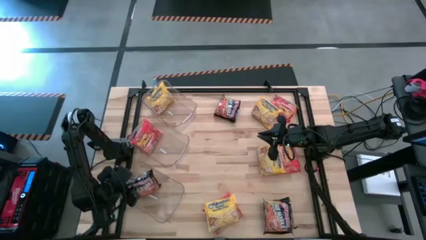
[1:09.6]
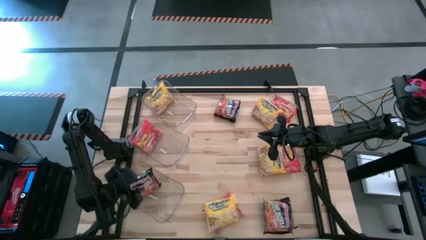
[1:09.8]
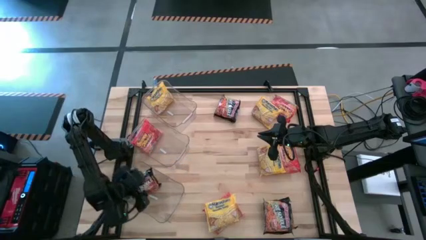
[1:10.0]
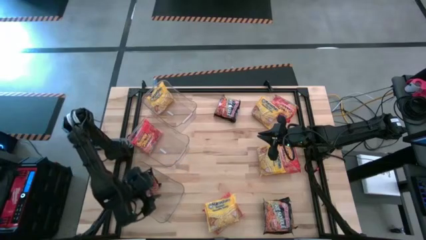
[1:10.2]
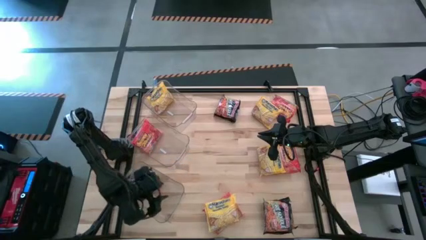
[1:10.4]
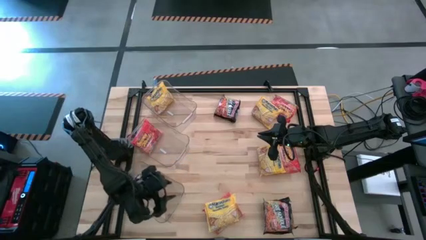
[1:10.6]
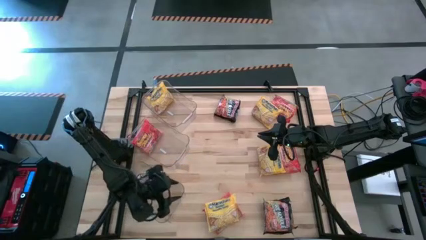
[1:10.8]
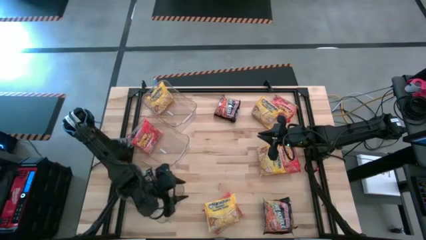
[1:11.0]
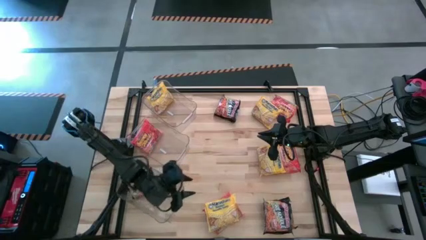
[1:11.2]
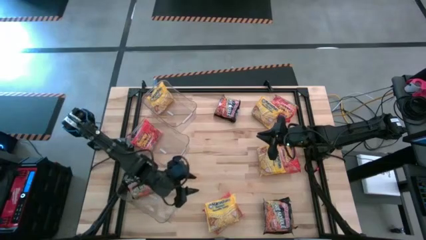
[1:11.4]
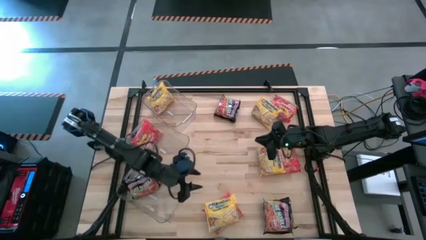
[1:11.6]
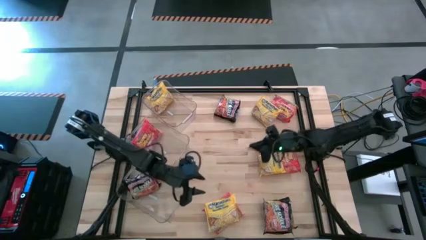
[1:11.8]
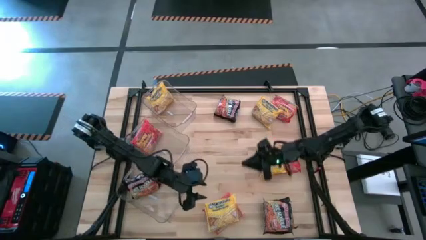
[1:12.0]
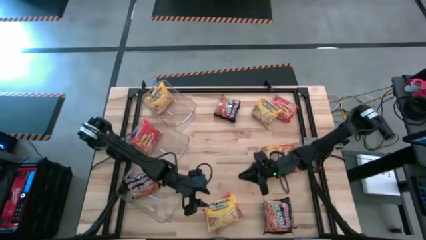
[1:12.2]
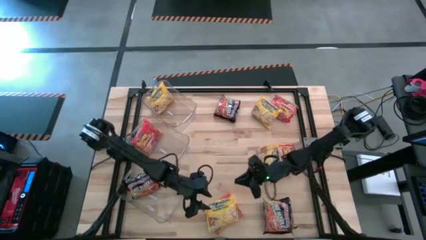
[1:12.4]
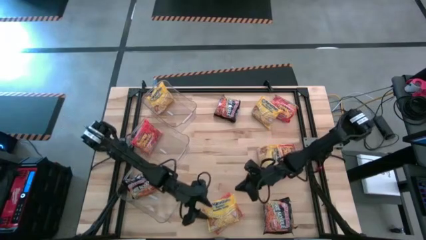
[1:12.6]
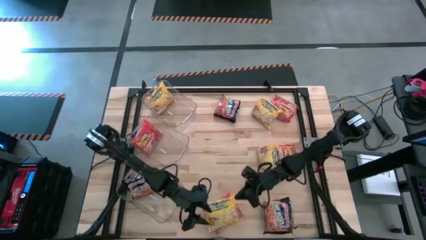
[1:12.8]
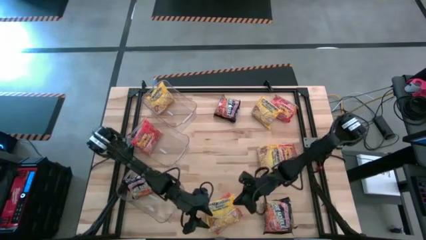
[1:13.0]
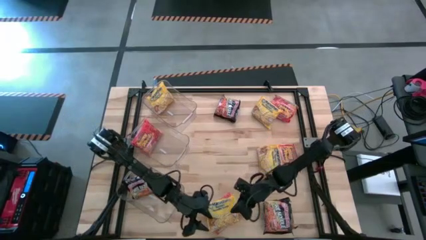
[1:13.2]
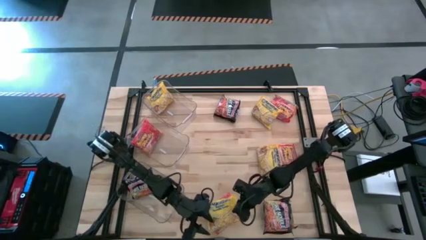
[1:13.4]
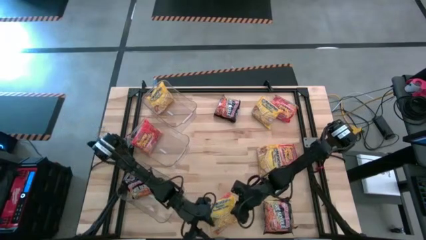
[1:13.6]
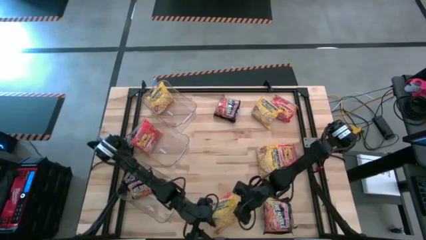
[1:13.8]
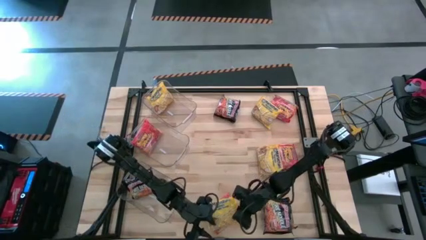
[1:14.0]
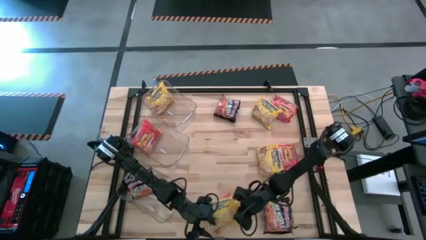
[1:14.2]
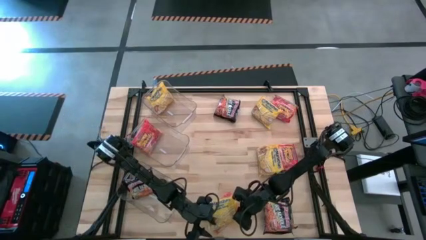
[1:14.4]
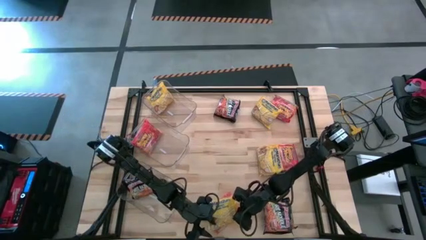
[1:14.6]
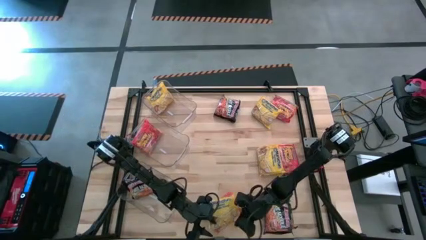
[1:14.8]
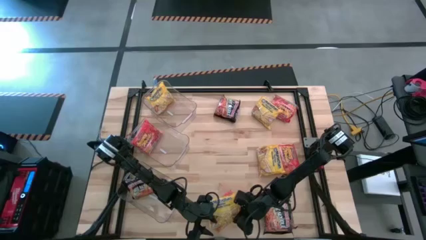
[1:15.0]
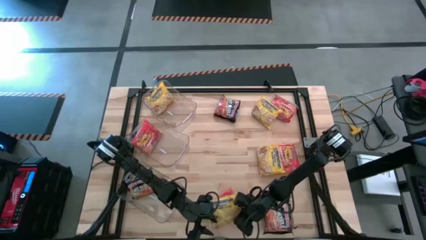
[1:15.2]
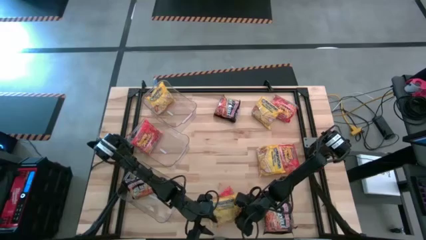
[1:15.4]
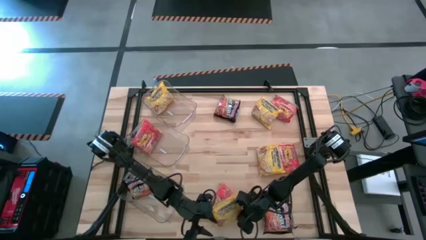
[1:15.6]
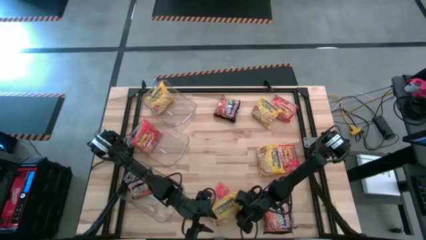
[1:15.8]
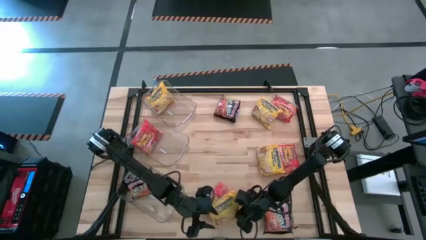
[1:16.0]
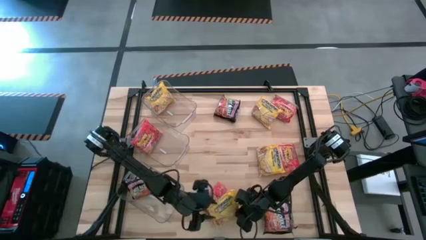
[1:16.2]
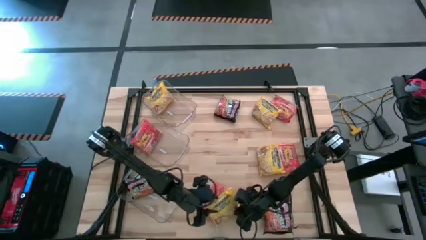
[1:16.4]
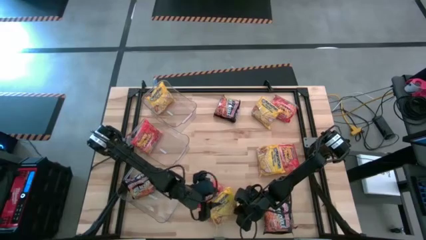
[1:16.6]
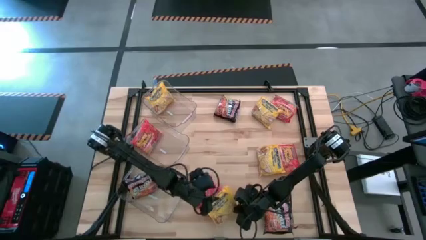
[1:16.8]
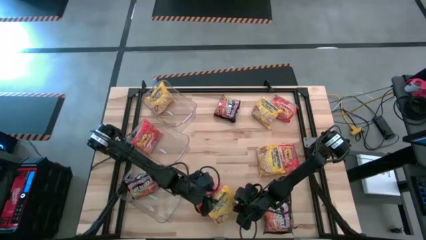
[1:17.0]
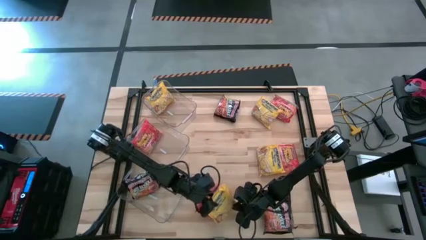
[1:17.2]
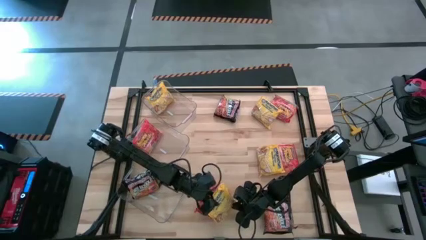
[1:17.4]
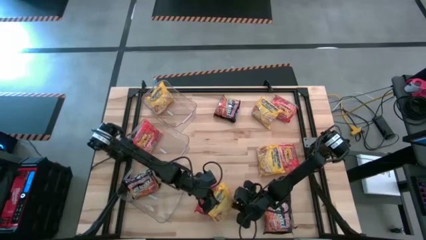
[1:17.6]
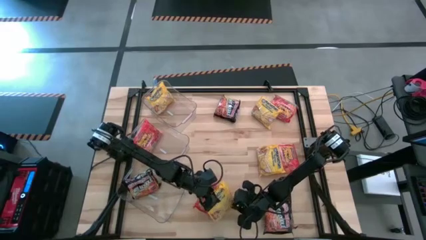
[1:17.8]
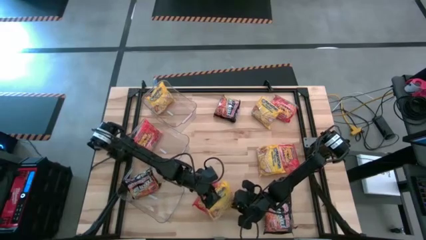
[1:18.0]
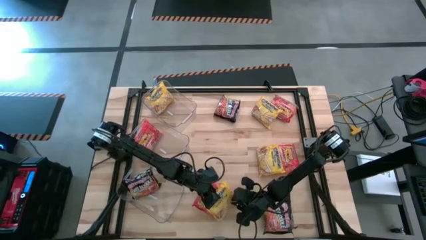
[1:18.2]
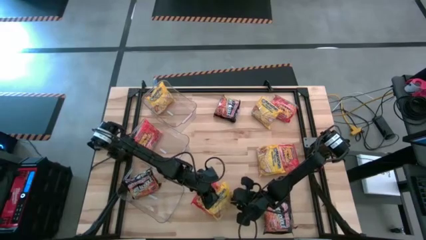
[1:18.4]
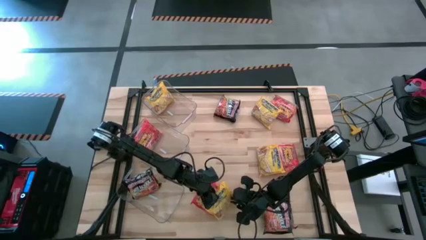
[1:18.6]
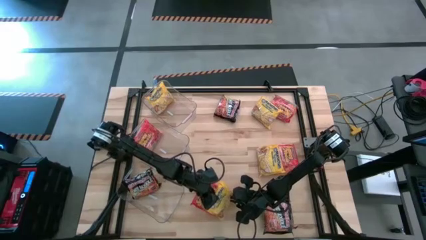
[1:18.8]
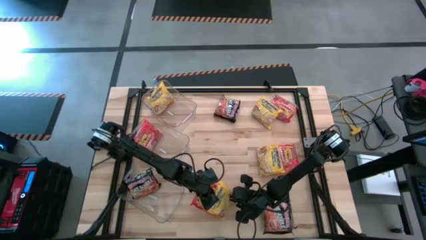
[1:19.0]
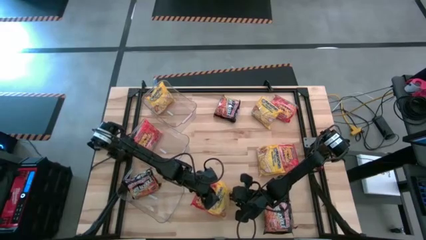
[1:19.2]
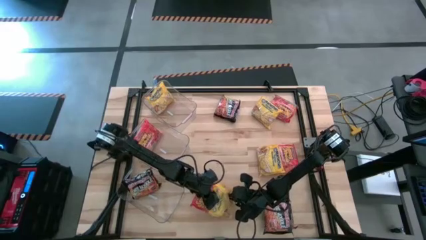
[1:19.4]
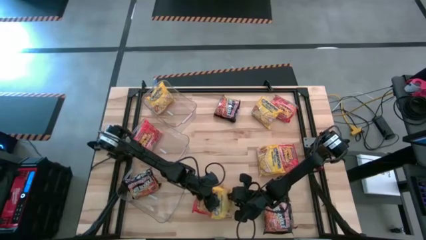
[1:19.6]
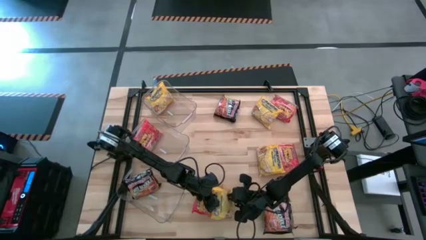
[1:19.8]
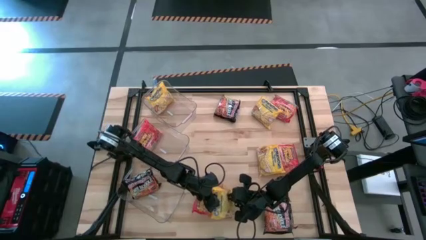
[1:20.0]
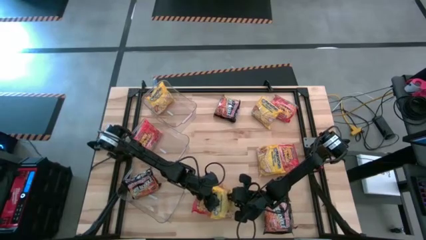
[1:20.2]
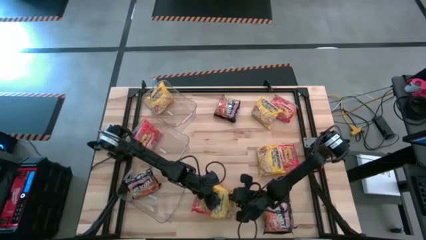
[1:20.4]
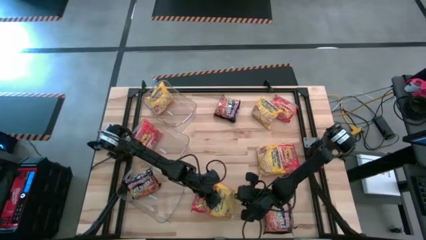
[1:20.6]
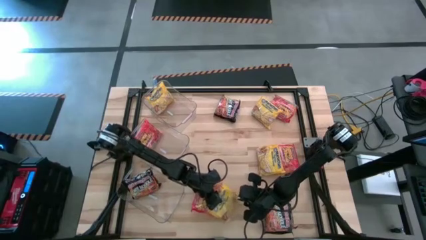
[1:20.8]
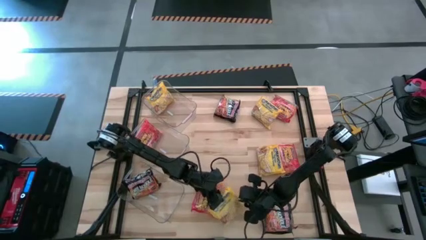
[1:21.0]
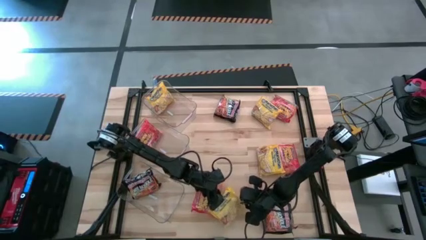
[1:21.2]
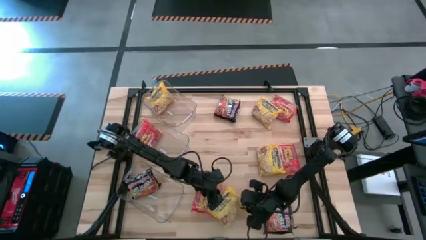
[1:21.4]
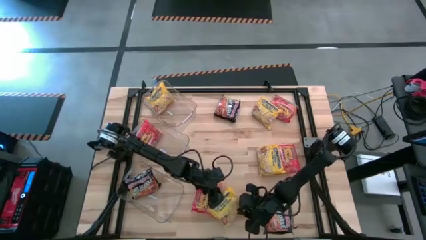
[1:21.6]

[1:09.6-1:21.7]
Task: Sort Maruchan noodles
Put the yellow noodles pack into the top transparent bin

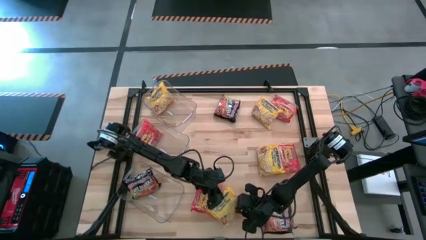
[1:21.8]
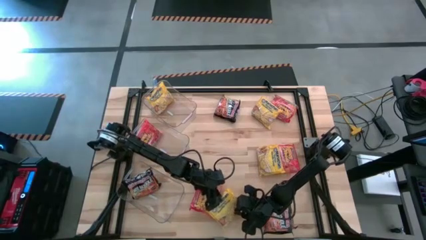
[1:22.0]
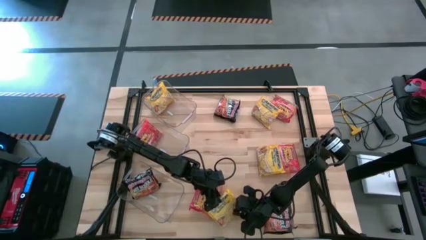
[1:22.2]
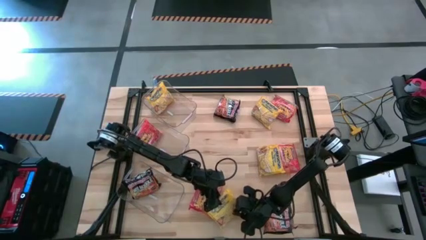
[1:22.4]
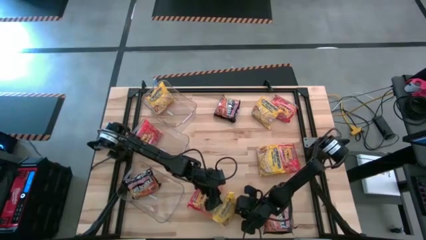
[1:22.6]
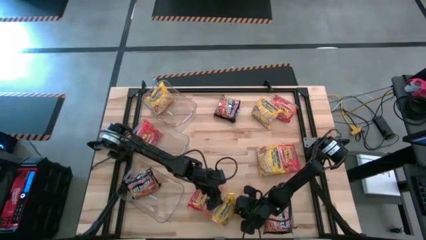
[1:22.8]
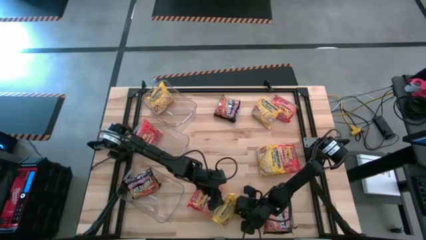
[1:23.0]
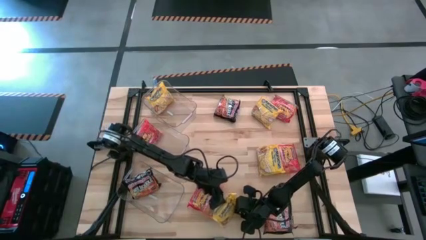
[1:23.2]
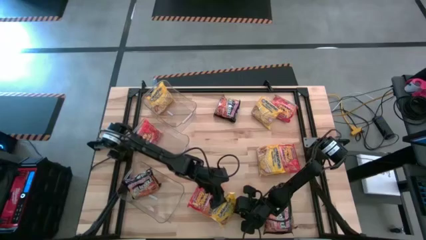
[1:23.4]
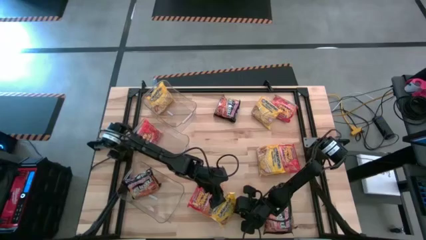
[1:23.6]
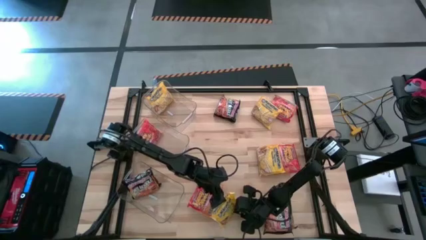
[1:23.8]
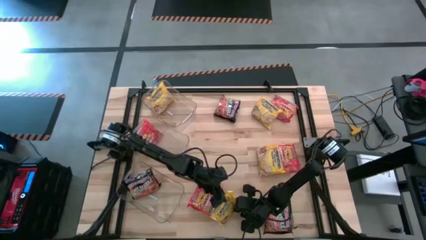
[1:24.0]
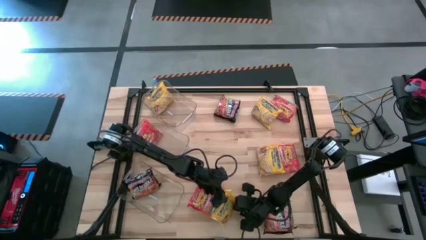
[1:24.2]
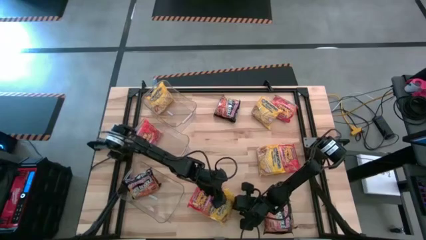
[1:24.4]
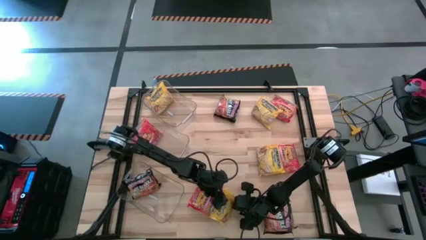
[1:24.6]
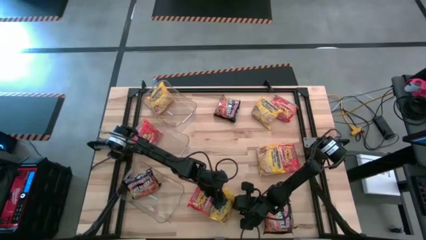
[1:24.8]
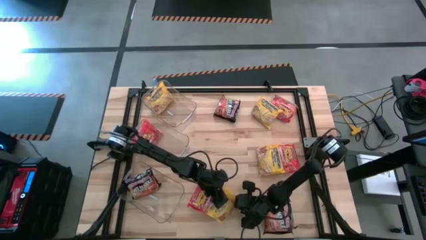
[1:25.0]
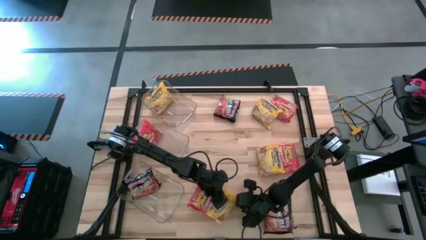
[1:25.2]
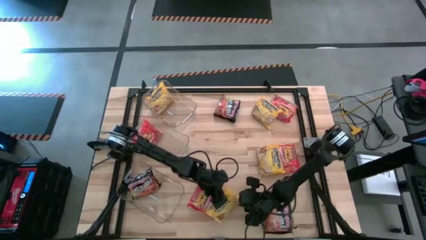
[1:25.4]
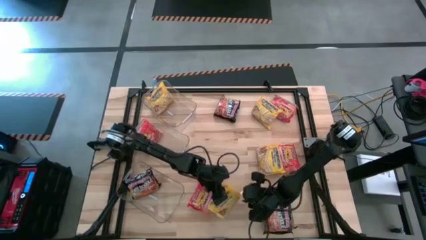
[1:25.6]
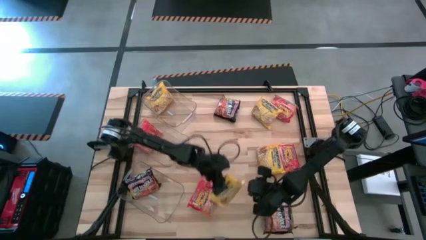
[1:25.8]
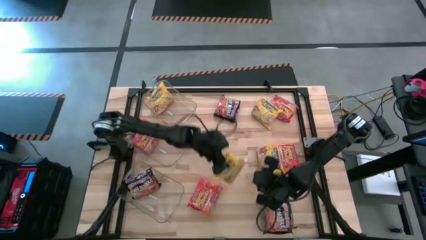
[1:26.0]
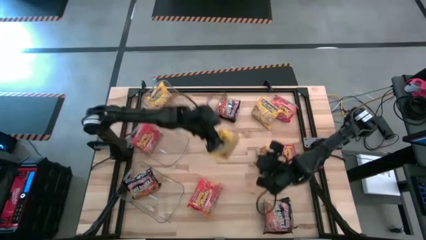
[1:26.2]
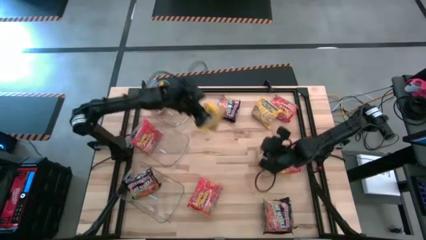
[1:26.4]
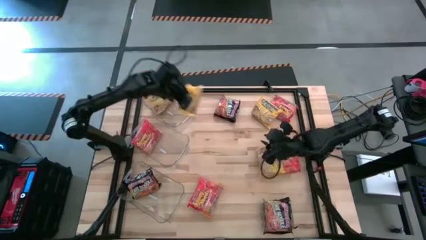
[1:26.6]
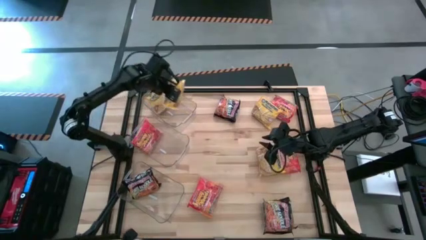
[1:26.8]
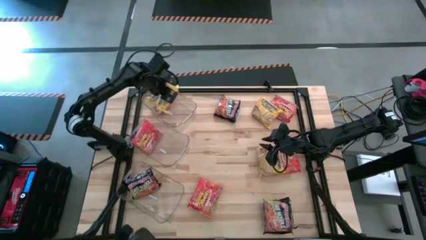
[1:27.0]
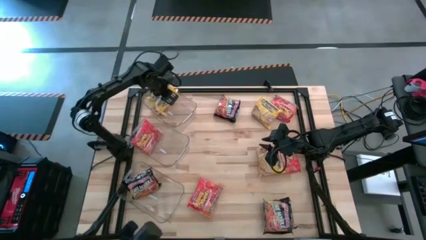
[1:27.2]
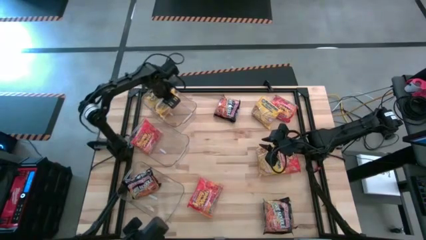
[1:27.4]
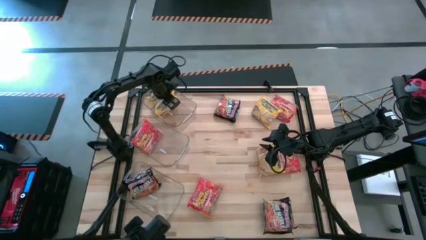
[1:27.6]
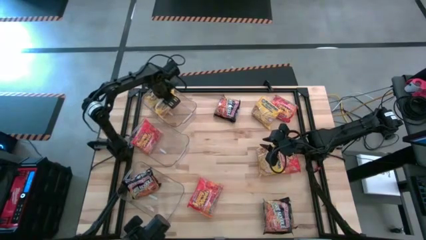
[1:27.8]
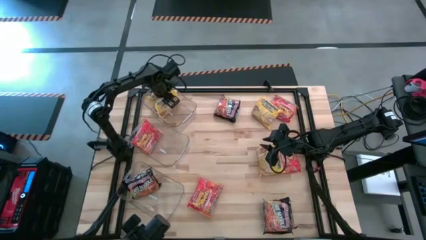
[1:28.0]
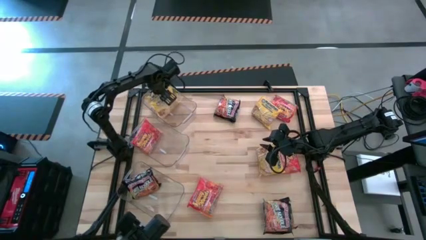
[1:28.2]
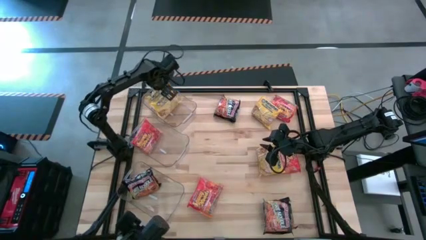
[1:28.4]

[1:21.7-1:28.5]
Put the yellow noodles pack into the top transparent bin
